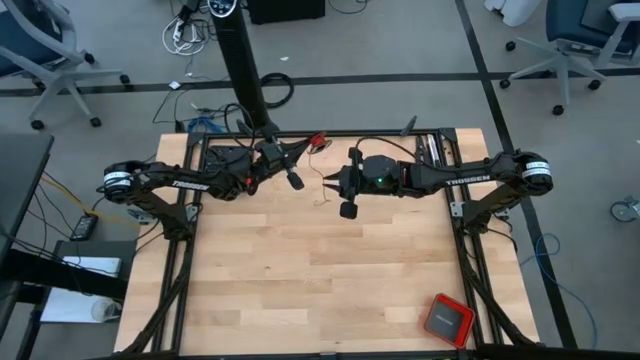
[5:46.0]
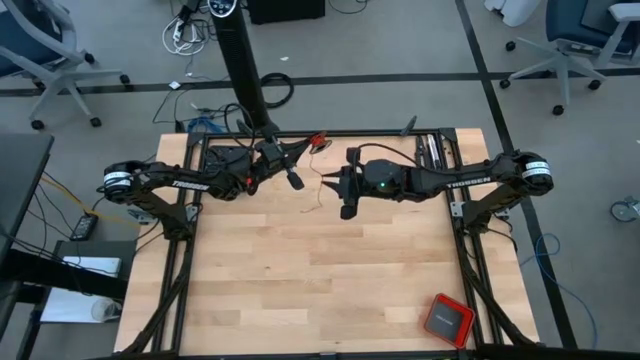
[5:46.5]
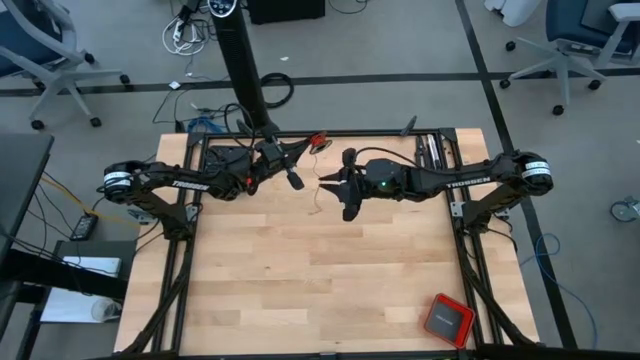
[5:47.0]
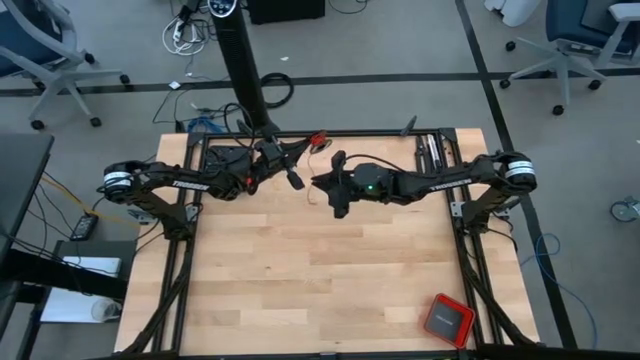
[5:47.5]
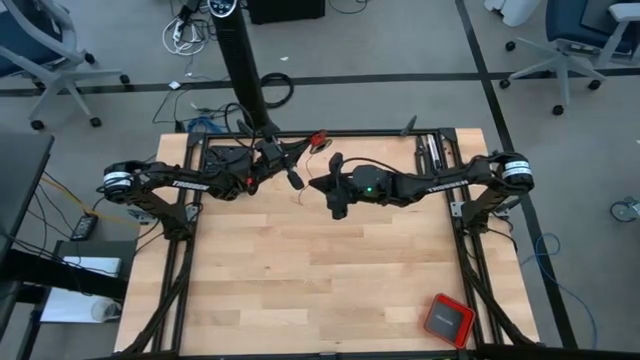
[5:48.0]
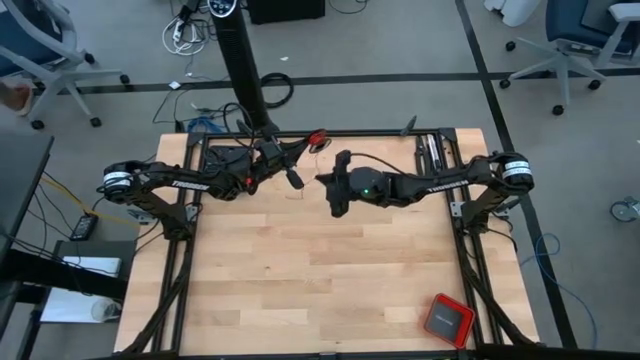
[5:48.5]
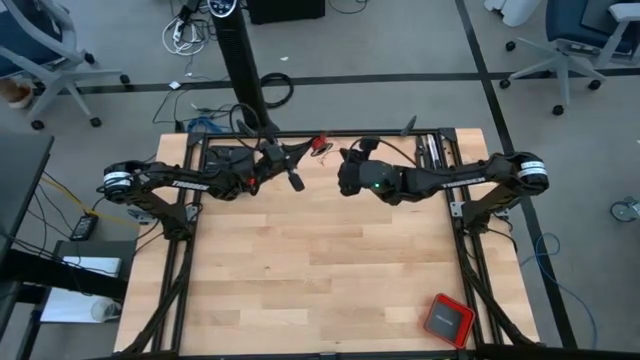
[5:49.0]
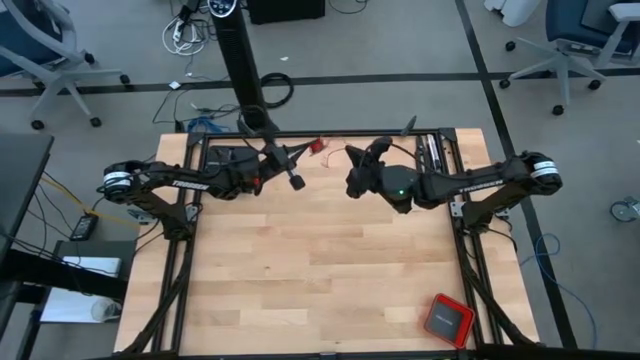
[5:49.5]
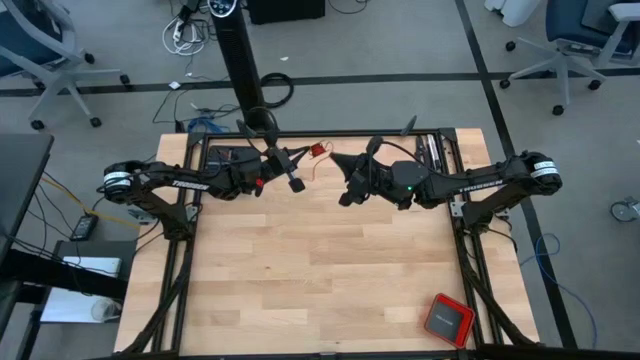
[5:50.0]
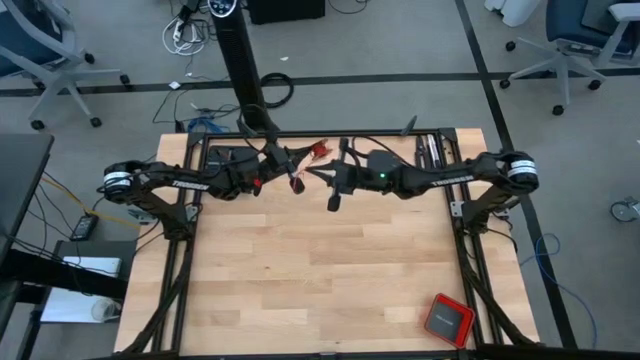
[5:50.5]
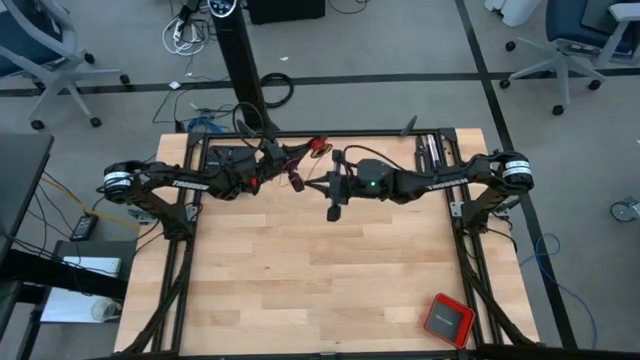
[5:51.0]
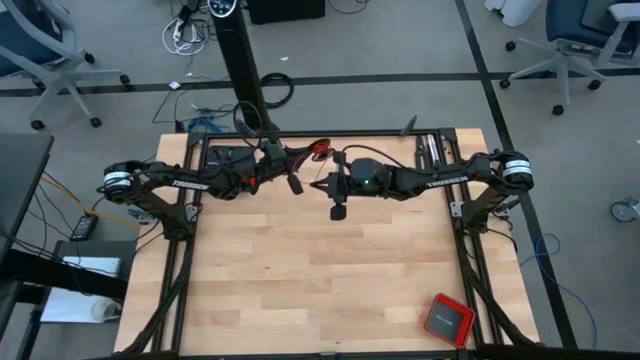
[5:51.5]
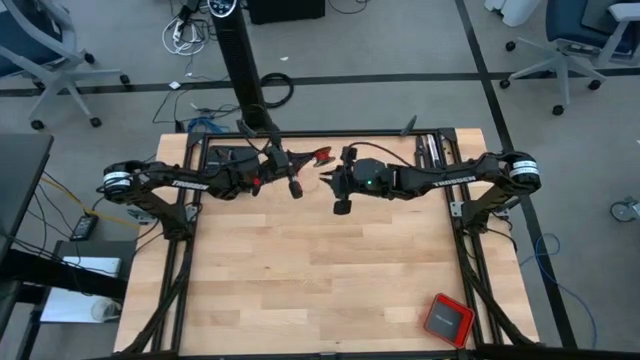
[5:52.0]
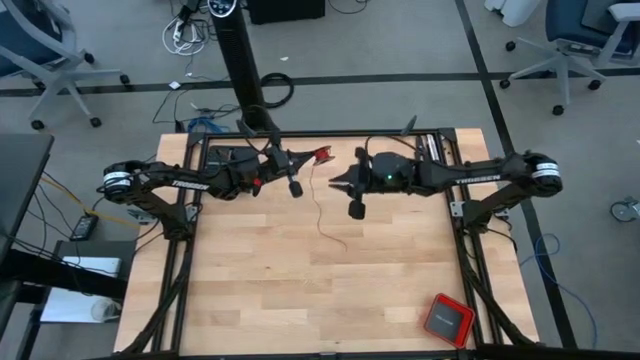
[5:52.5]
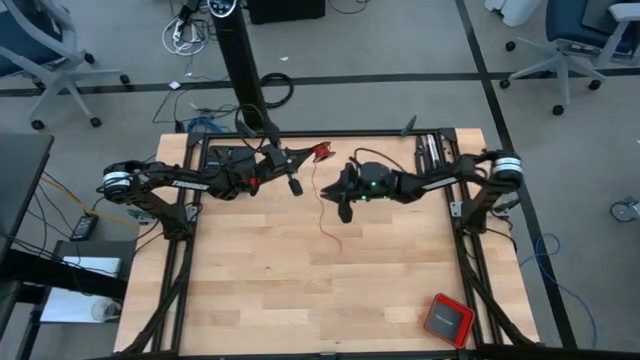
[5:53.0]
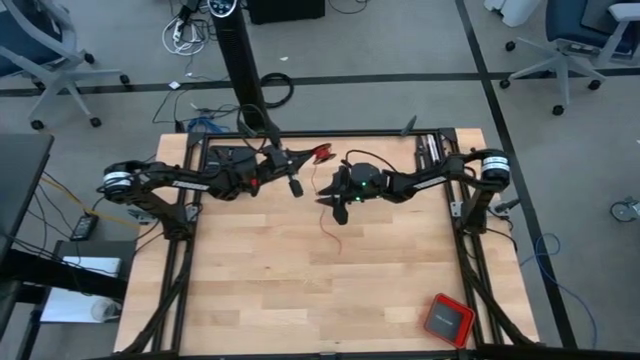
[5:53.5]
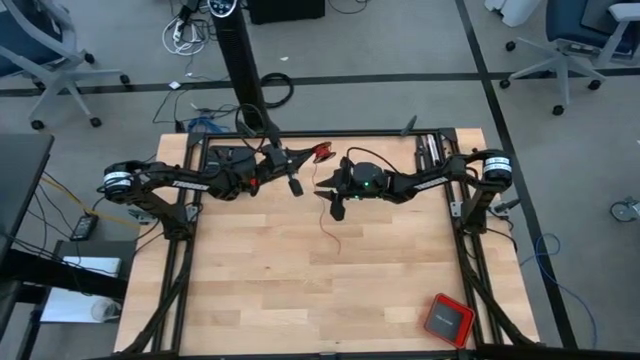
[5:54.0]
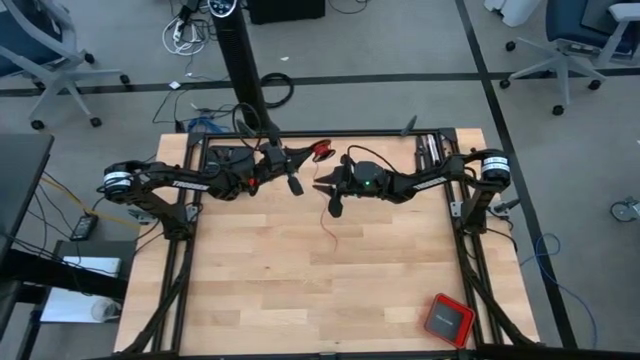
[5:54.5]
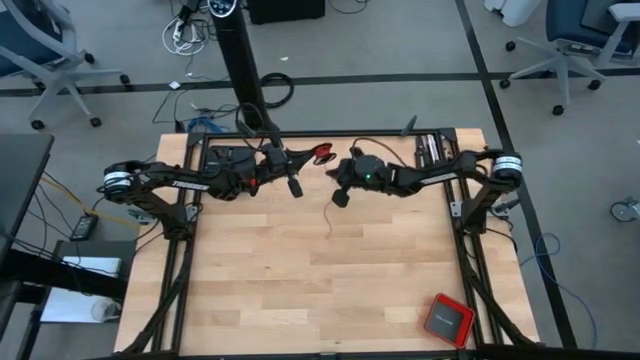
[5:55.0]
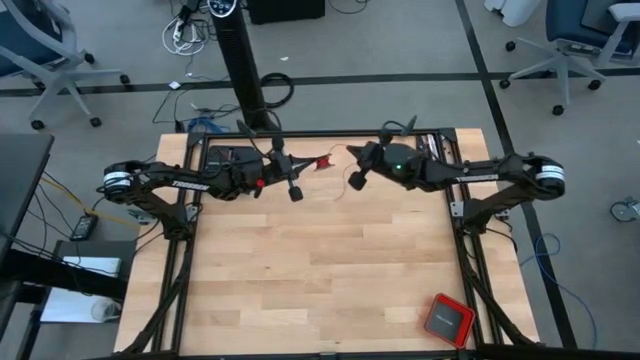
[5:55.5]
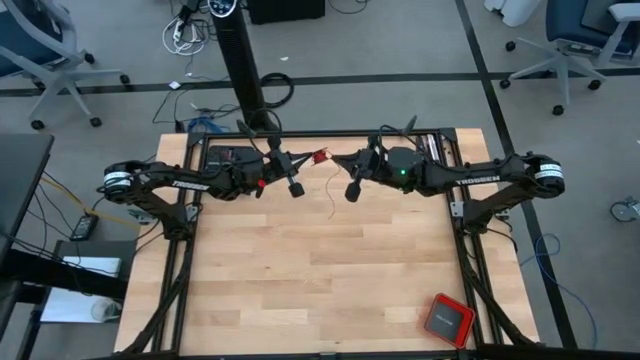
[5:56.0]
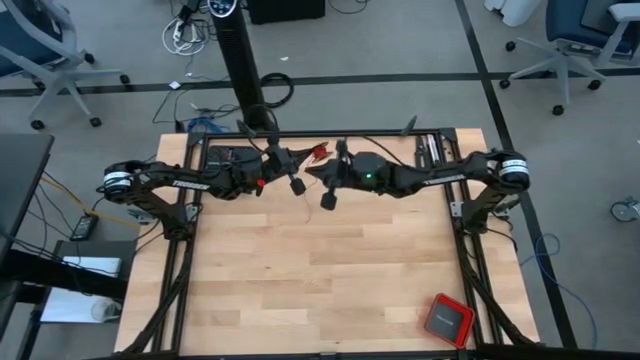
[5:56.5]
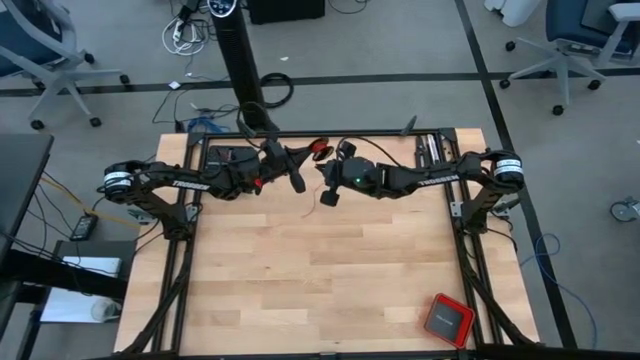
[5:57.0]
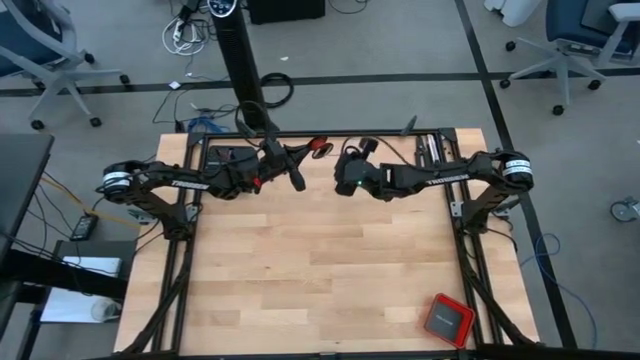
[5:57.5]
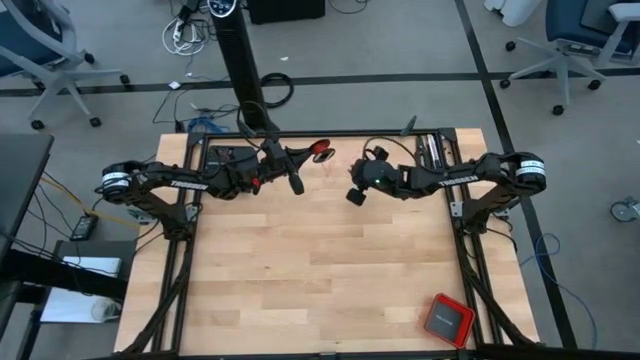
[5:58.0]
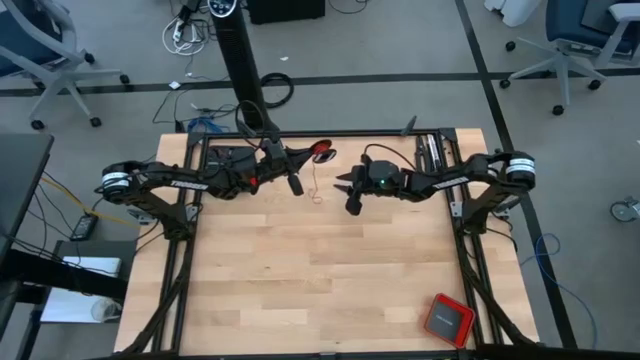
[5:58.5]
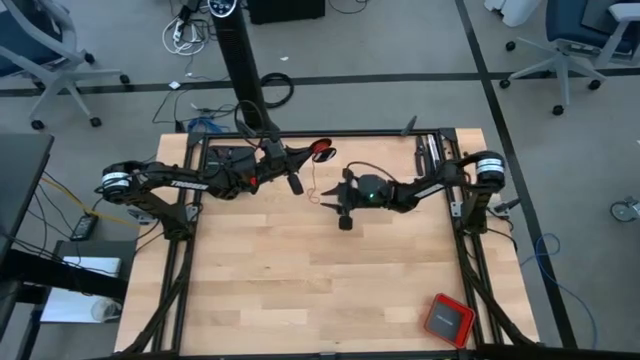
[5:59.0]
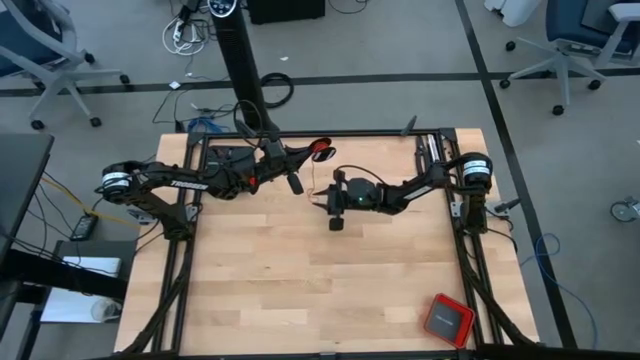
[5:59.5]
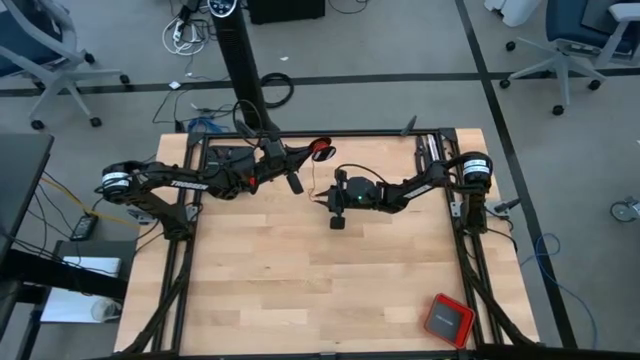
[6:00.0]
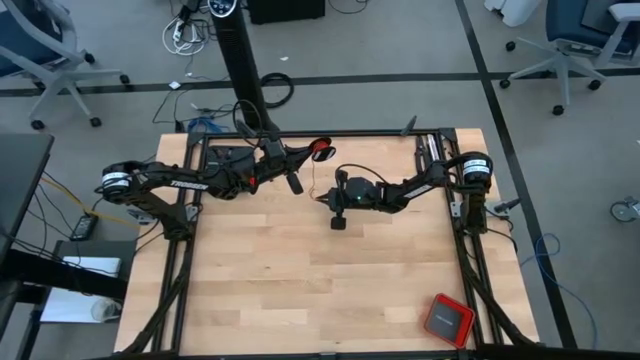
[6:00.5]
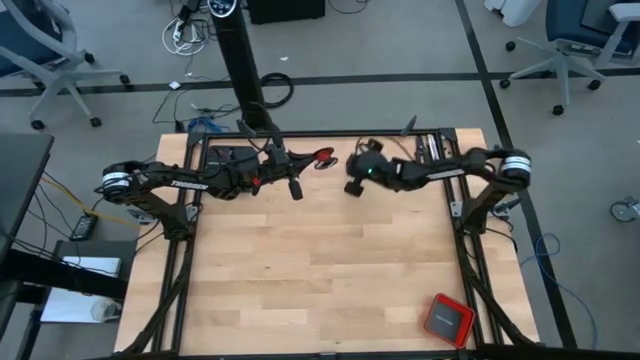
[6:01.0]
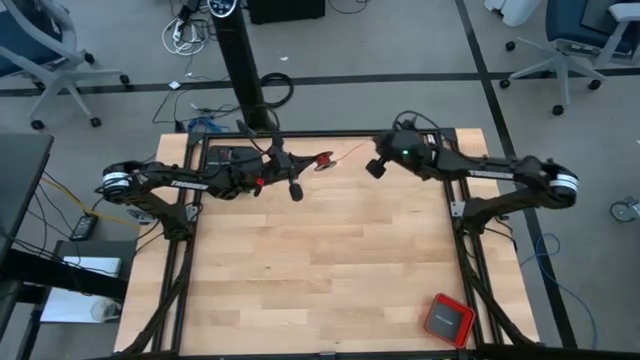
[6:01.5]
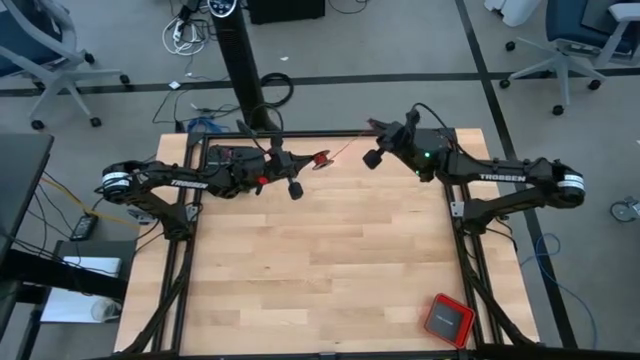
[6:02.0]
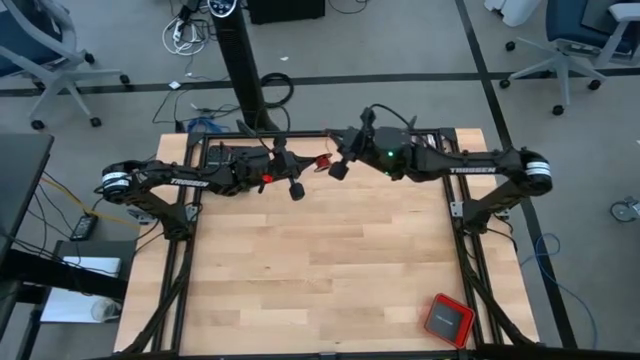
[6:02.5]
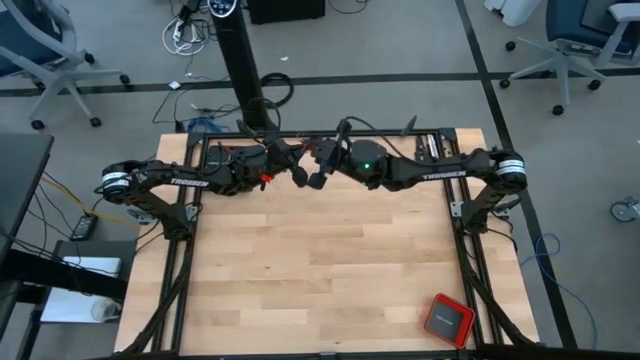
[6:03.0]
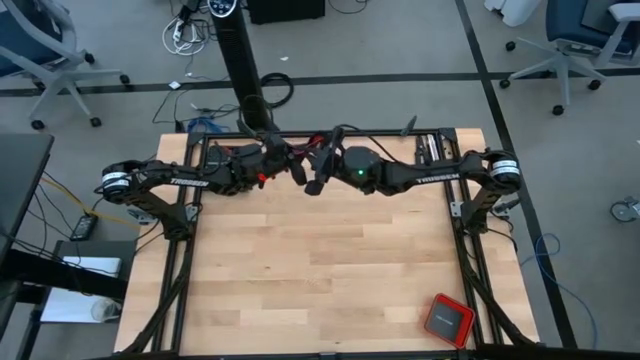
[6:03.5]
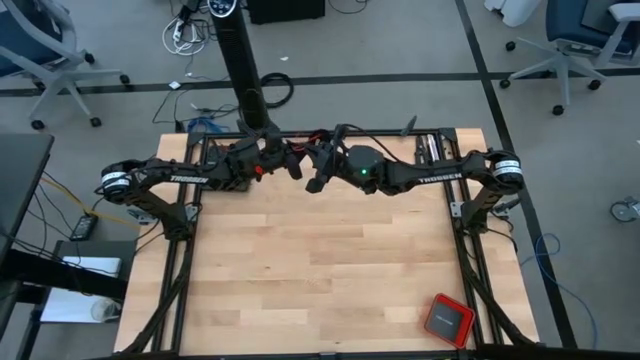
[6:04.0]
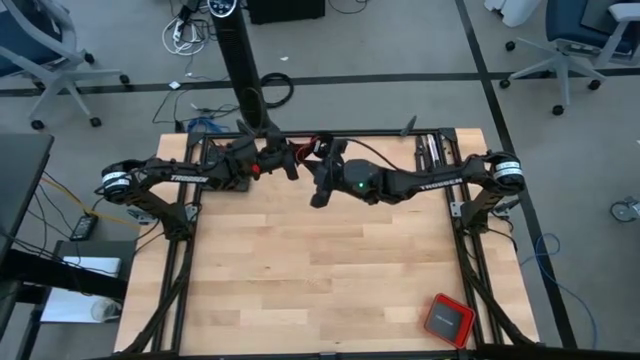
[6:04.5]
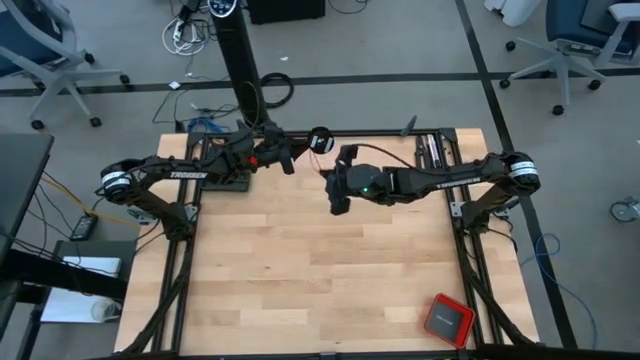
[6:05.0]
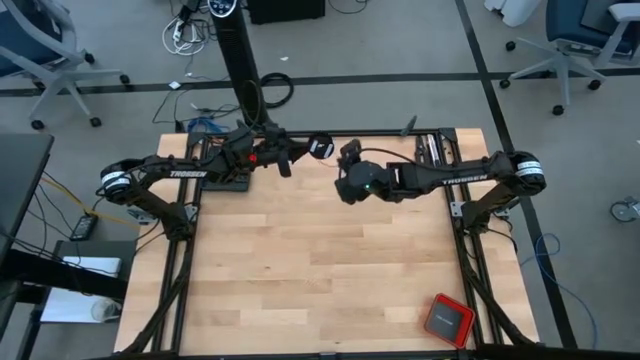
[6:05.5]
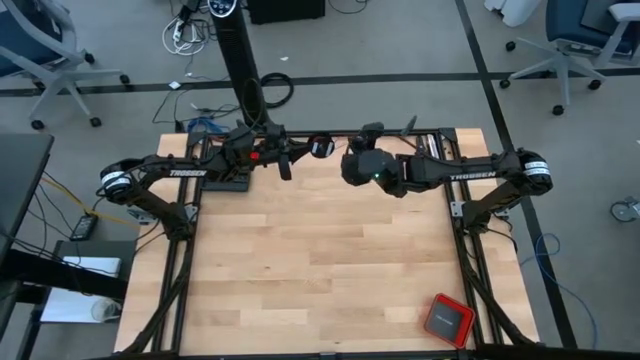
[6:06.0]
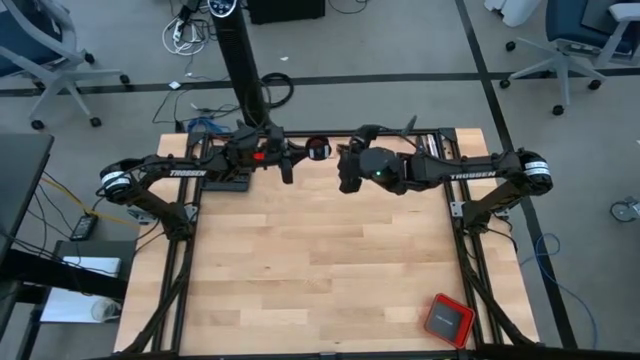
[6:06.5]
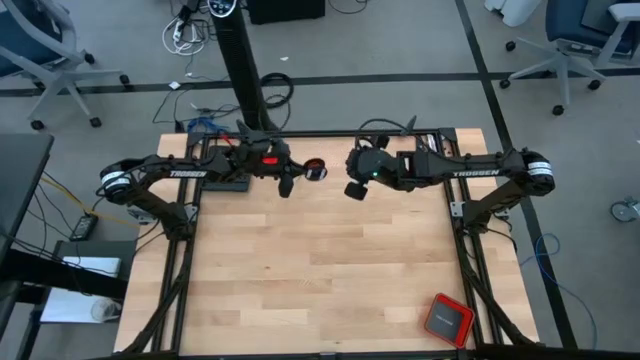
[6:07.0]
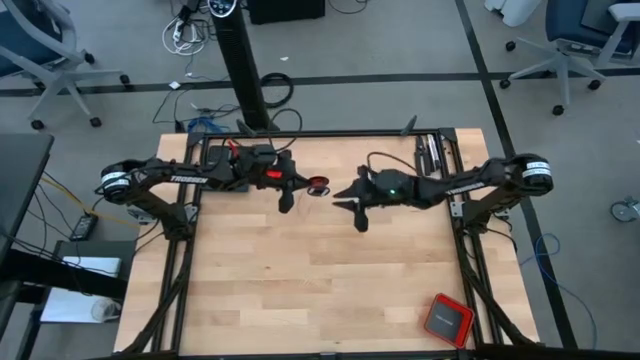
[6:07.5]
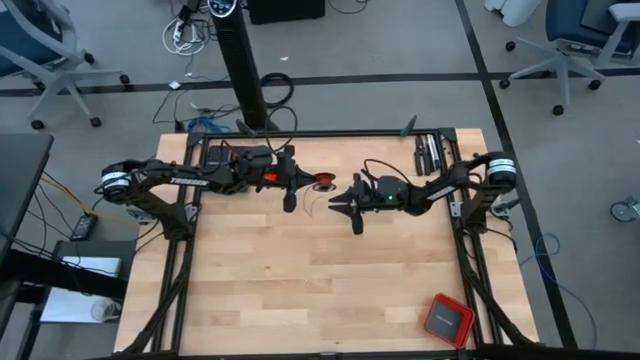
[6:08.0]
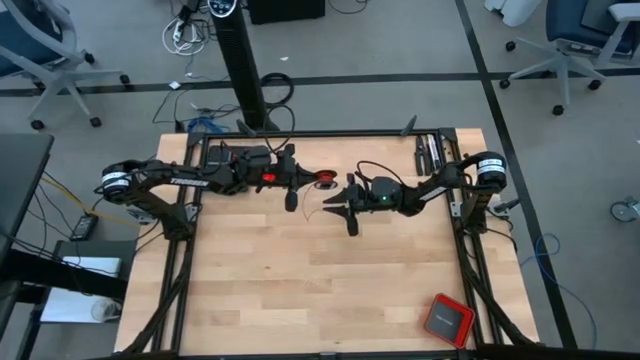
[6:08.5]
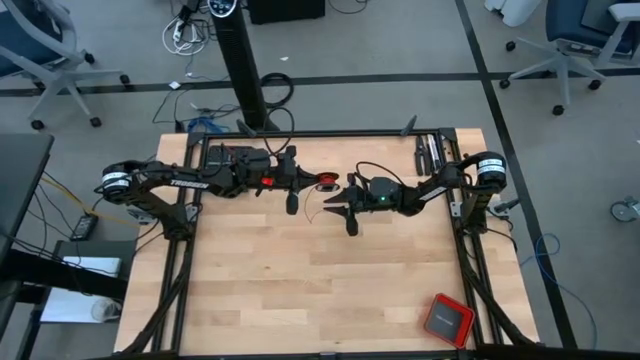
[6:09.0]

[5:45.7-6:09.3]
Task: Coil cords
Coil the red wire onto the spool
